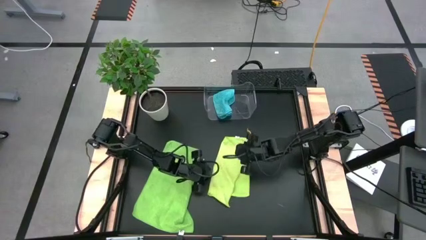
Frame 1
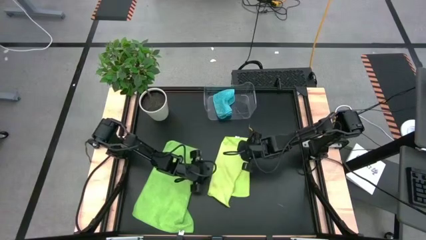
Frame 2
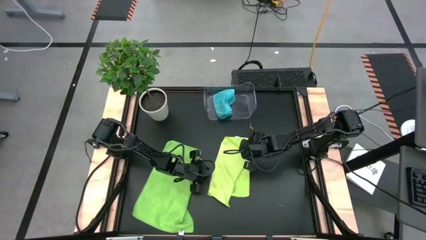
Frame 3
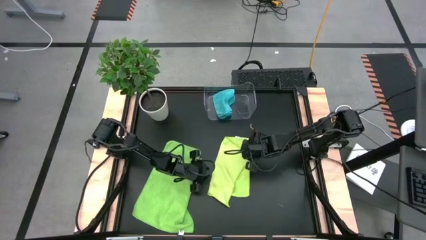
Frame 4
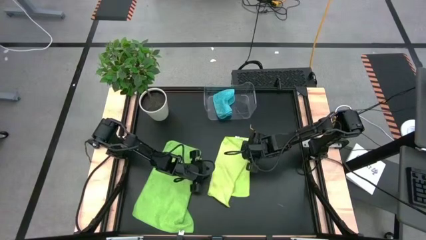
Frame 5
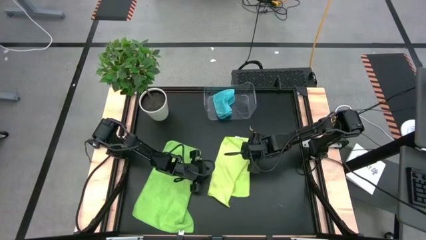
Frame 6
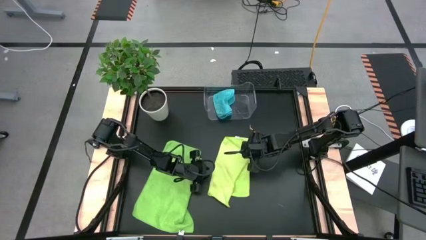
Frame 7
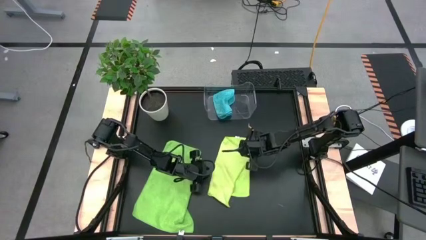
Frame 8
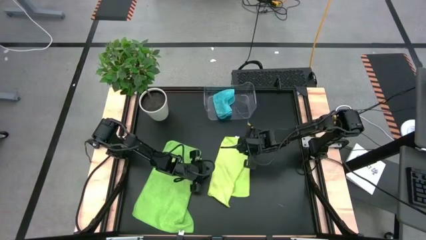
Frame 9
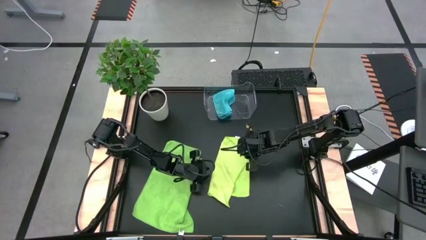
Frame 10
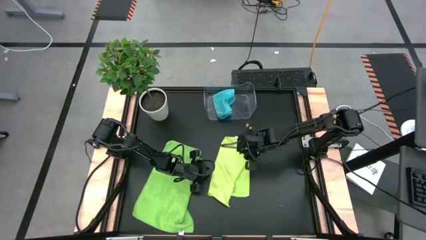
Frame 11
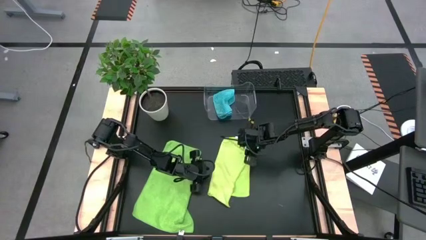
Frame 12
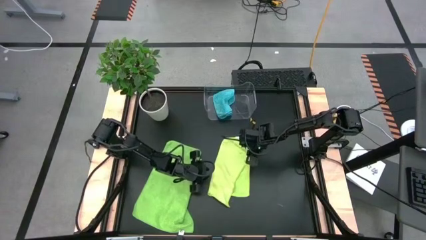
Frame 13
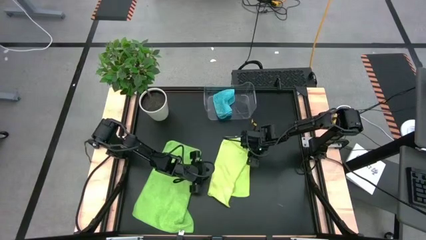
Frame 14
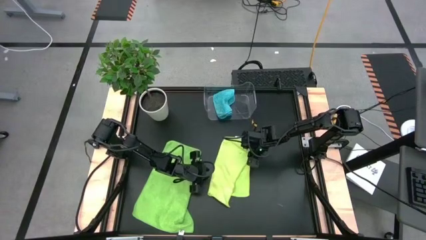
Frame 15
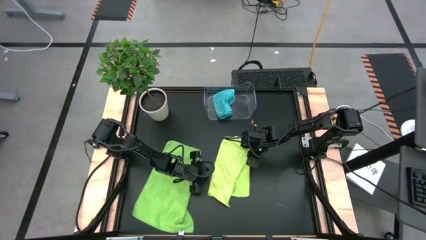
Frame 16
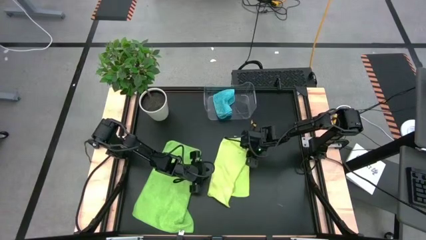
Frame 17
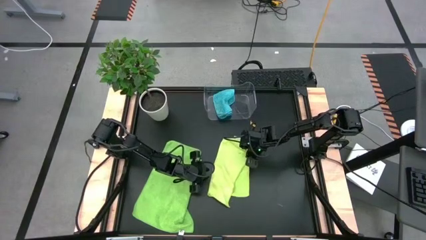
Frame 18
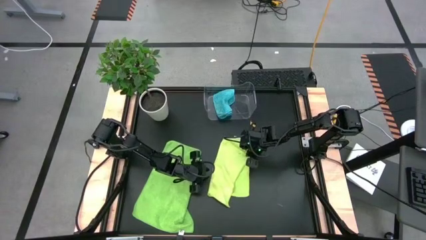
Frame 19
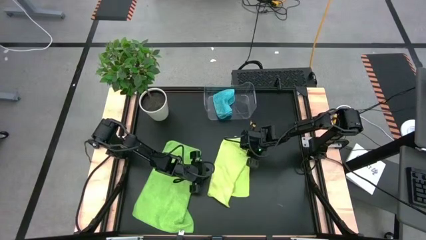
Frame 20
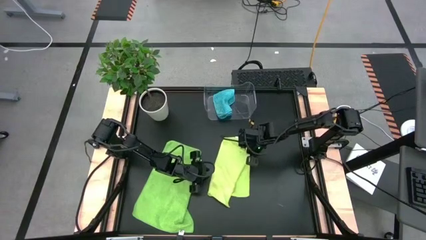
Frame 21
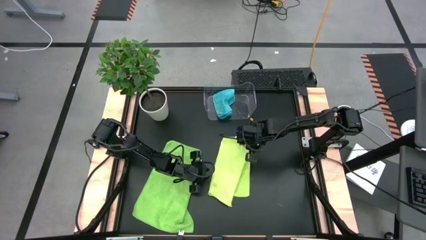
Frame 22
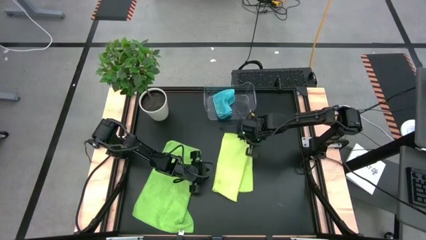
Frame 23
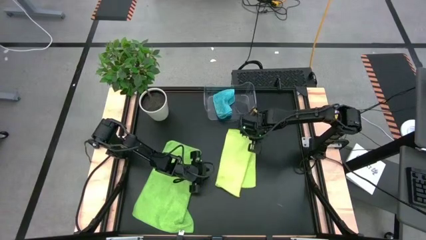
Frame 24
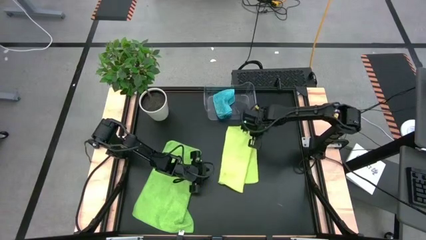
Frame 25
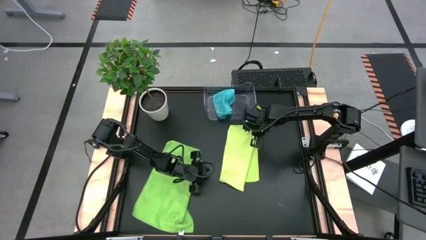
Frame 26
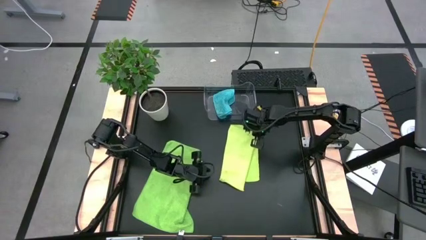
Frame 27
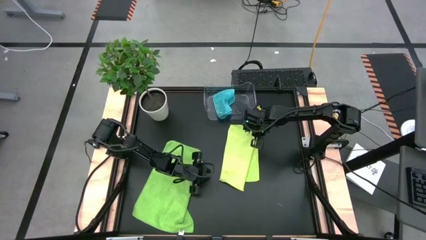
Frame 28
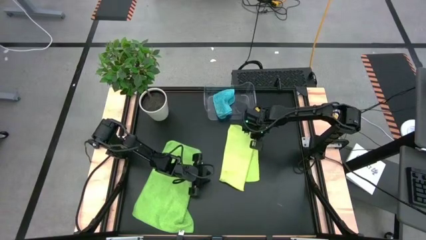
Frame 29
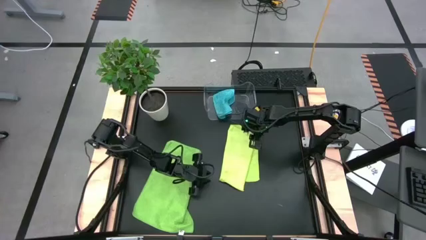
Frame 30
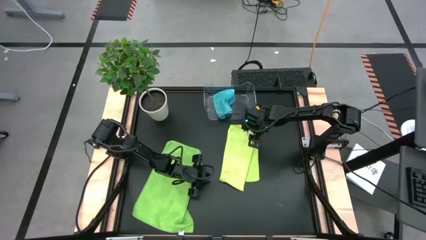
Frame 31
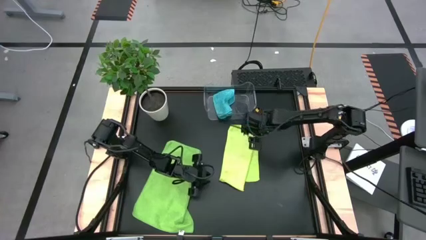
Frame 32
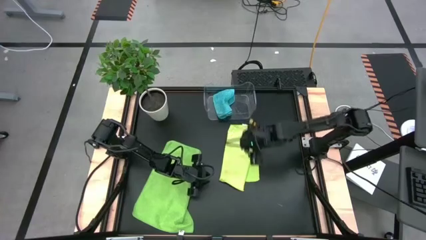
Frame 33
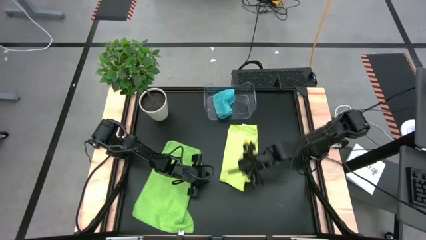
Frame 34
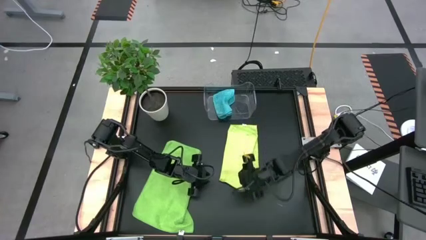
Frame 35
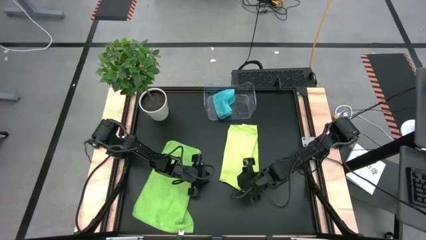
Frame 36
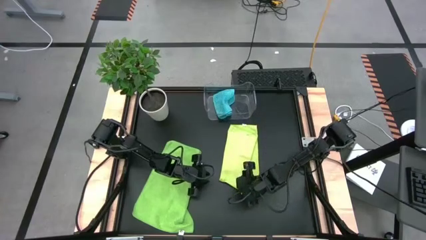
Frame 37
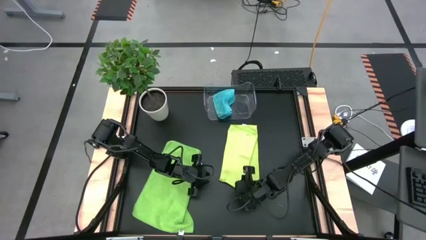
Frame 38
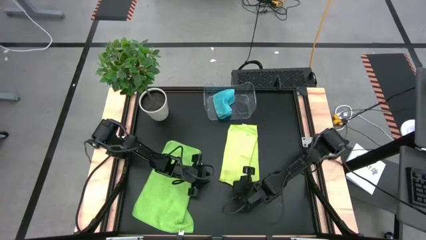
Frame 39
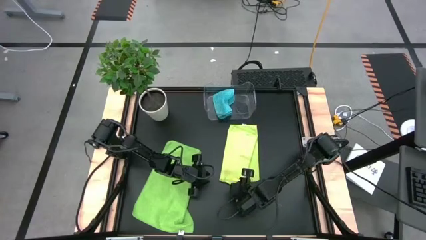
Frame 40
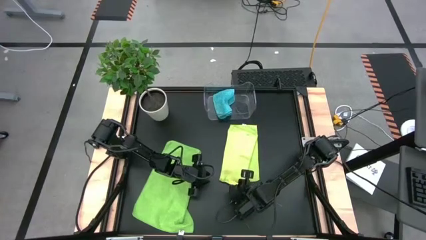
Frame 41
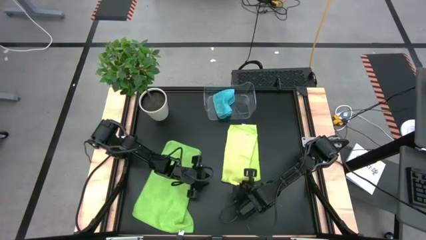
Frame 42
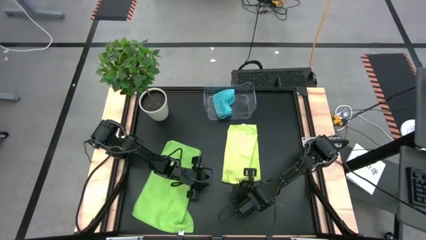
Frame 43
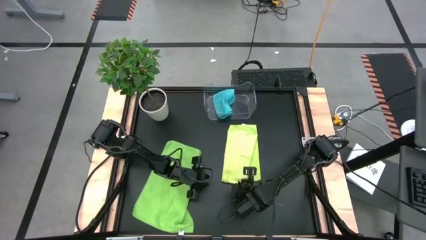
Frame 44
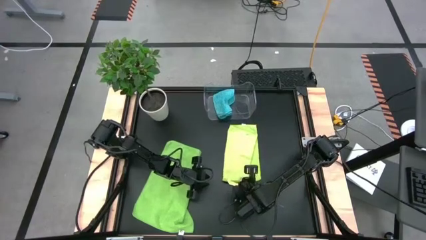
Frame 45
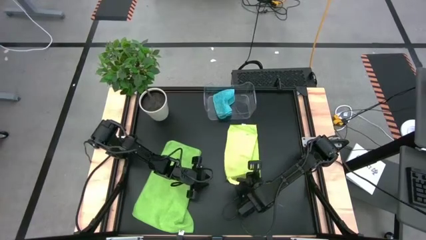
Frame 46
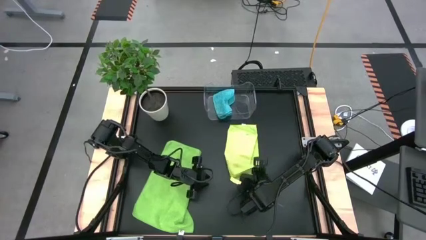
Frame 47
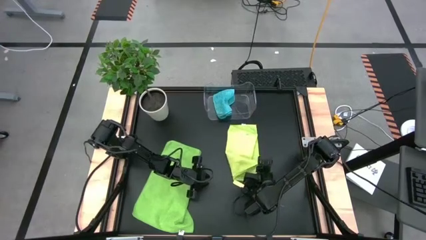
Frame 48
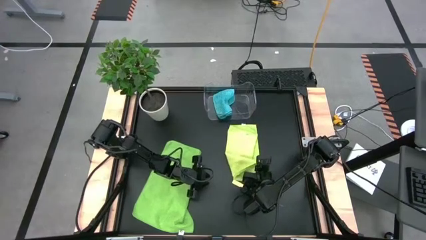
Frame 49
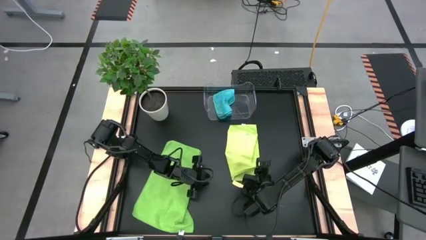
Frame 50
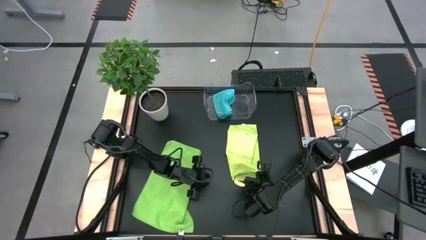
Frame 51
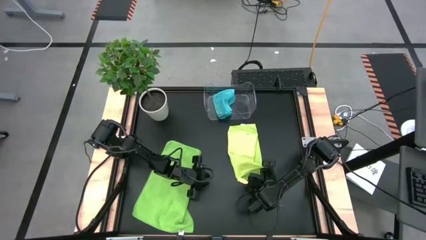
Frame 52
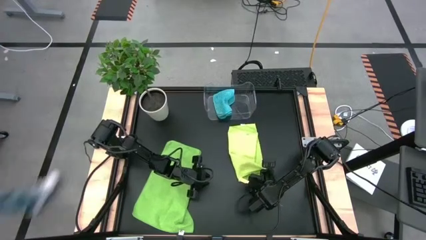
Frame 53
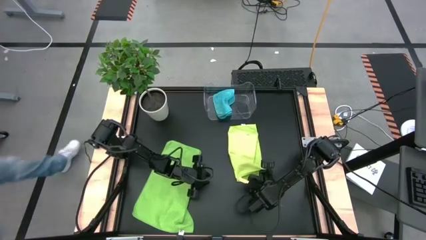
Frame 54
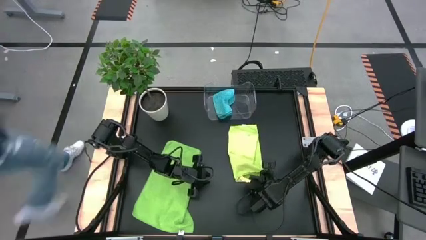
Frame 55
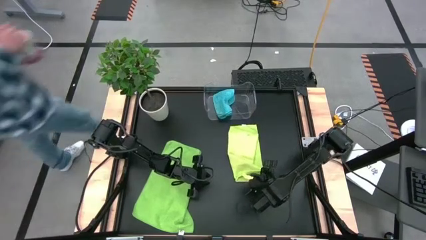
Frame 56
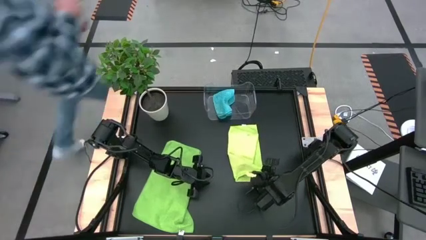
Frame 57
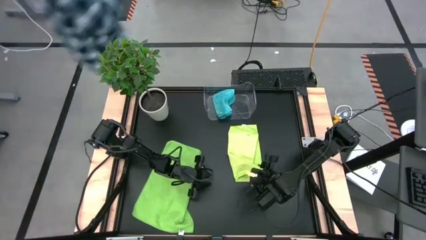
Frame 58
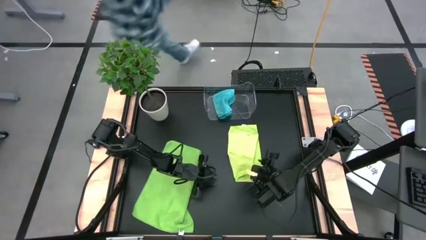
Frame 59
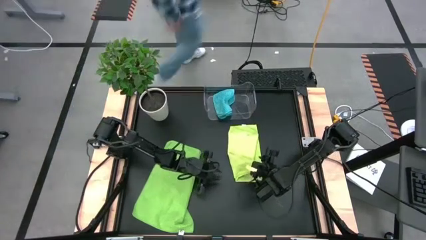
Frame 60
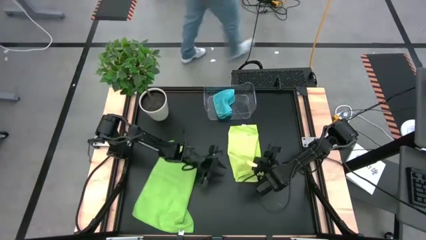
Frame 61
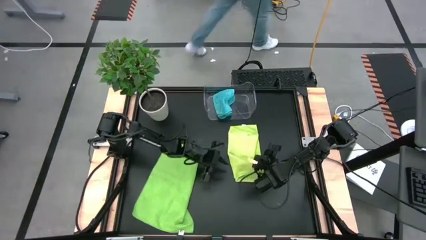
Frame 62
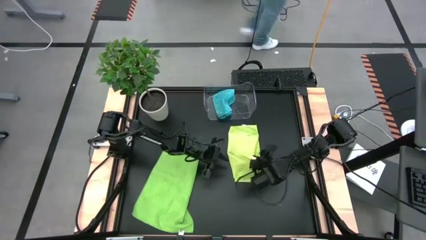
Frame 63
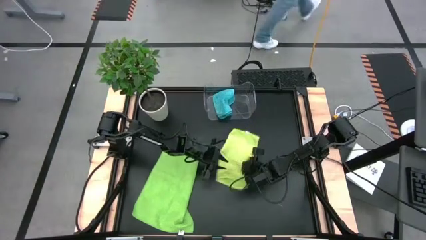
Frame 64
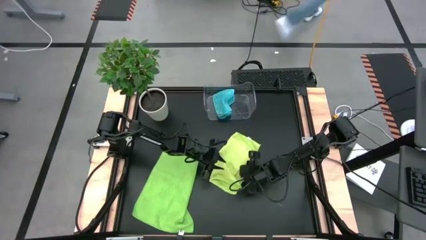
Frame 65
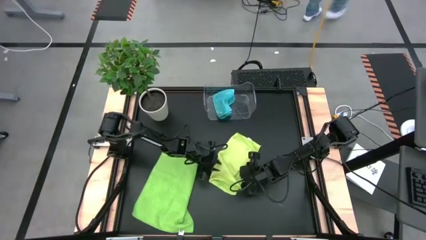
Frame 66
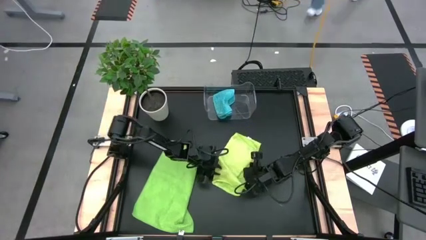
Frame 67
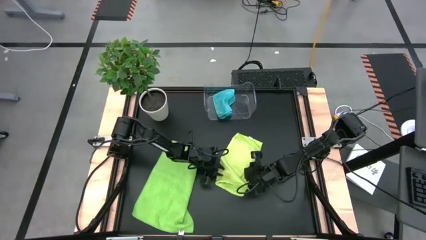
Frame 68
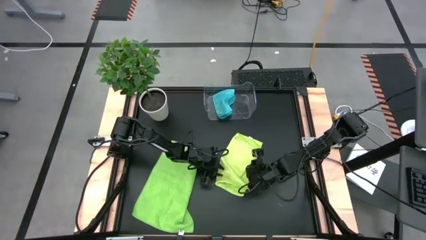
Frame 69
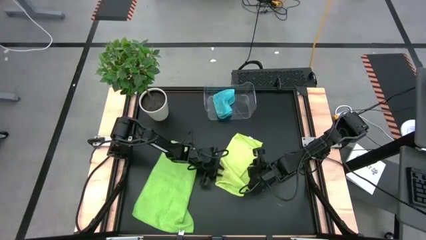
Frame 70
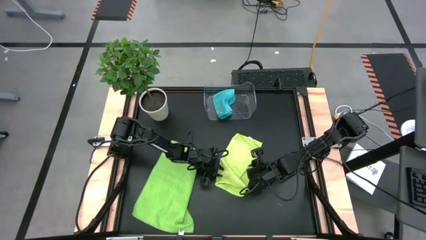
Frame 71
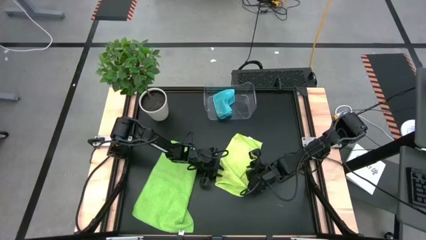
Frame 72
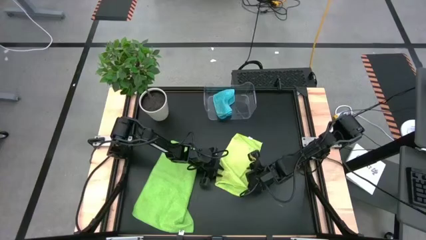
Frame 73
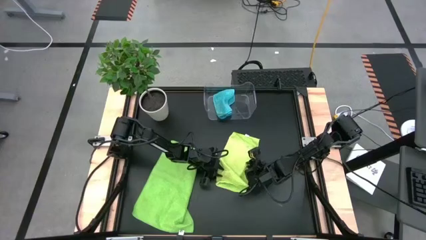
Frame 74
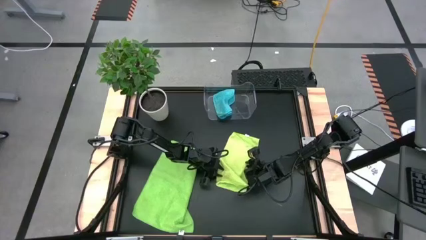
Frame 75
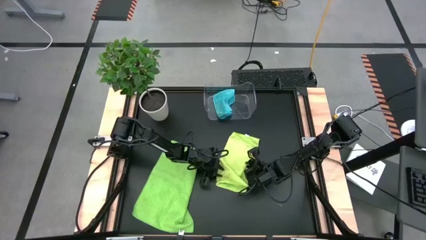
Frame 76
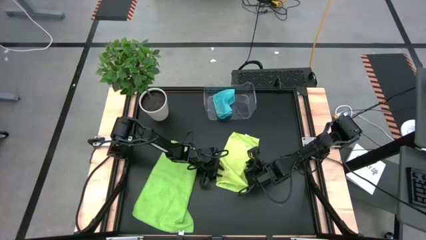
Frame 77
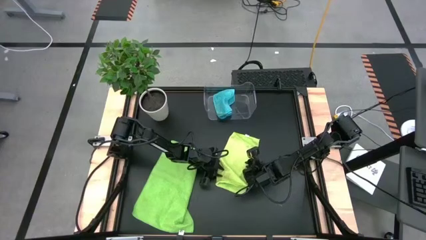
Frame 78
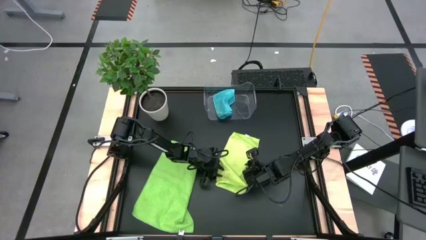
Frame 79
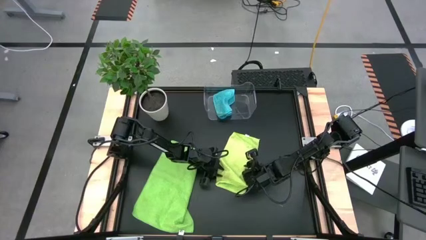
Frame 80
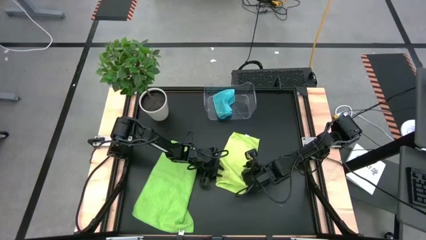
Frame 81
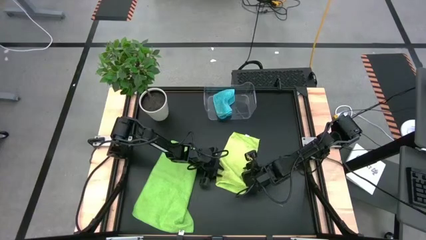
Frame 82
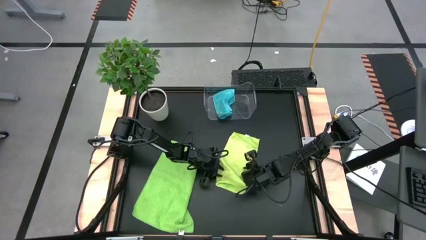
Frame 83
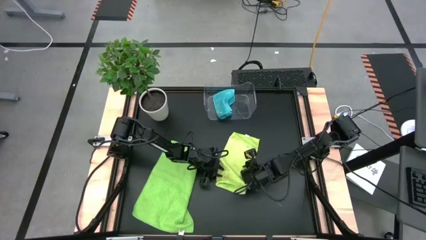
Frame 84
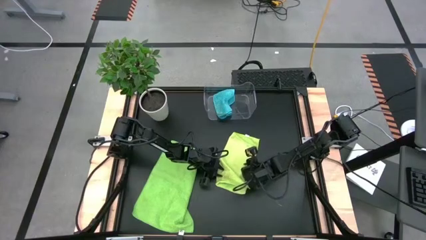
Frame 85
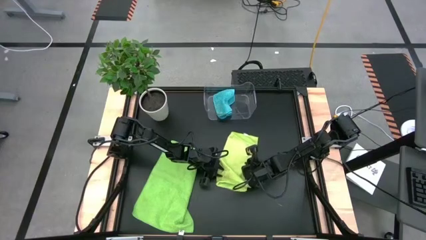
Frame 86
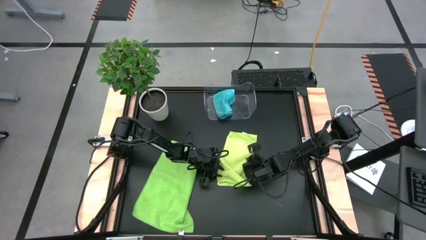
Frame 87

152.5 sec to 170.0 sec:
Task: Fold microfiber towels
Fold the light green microfiber cloth
